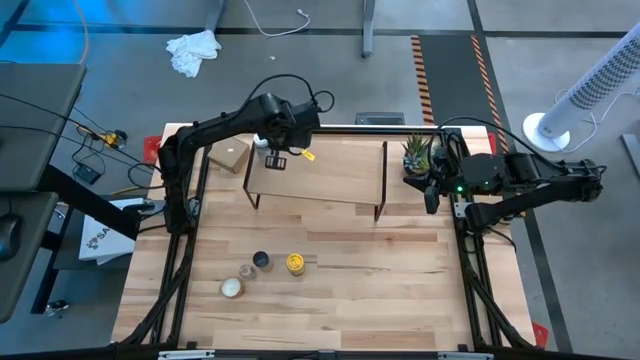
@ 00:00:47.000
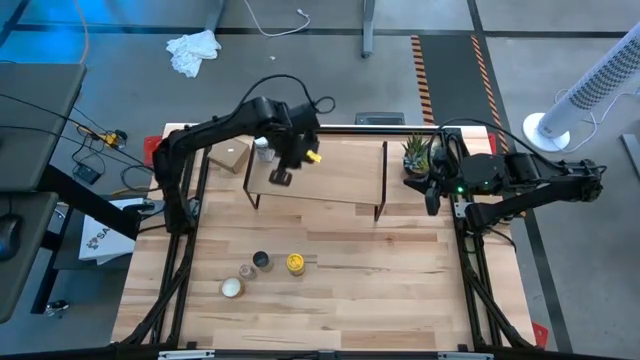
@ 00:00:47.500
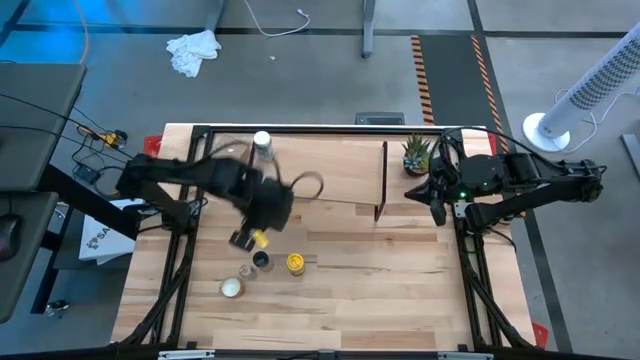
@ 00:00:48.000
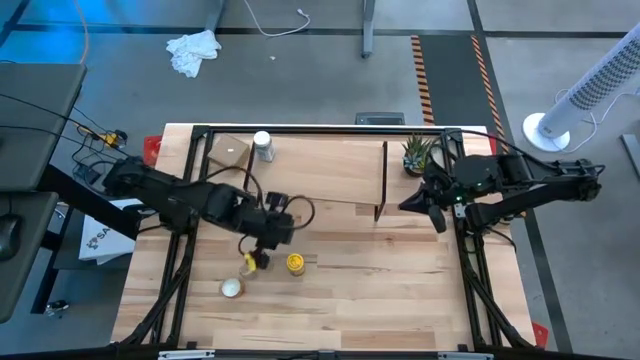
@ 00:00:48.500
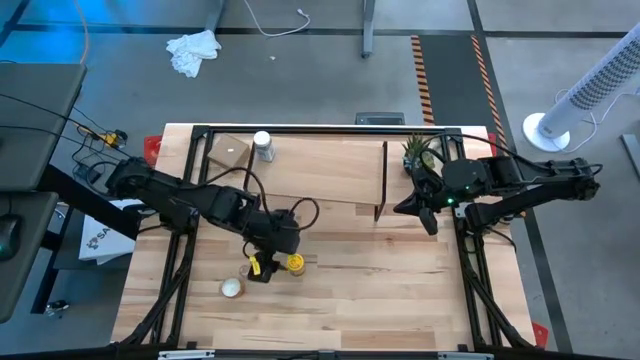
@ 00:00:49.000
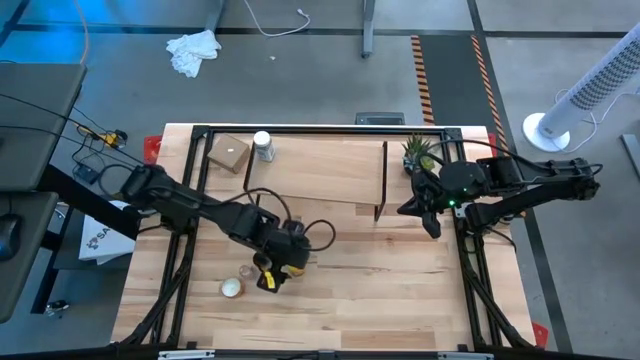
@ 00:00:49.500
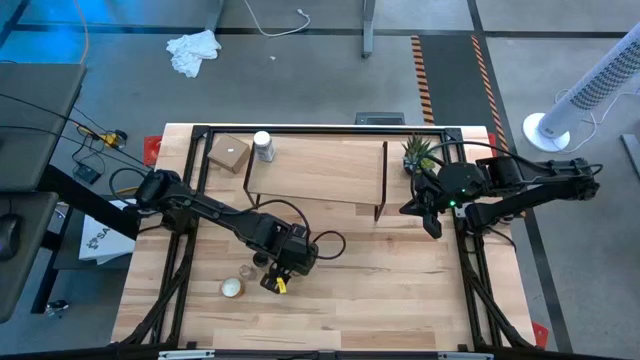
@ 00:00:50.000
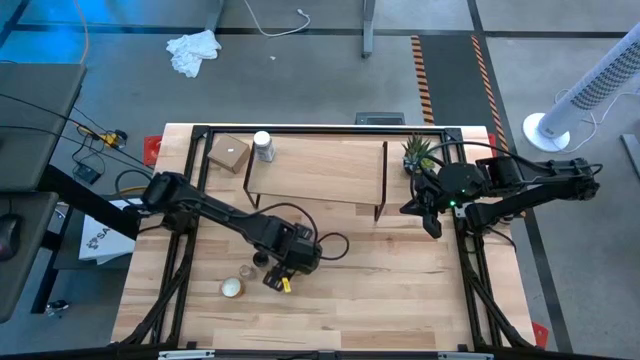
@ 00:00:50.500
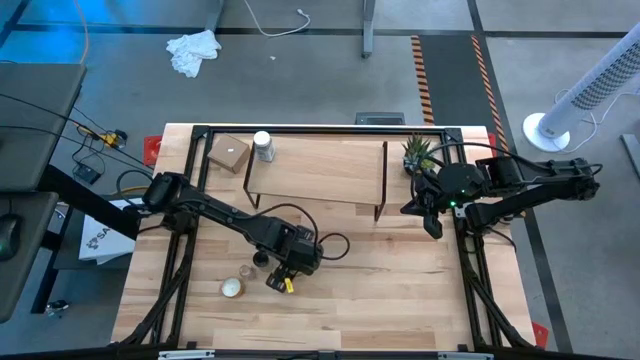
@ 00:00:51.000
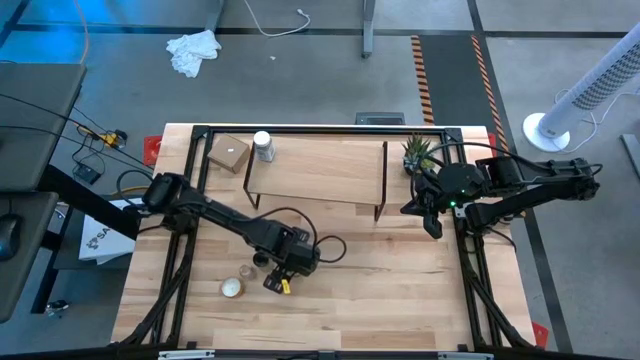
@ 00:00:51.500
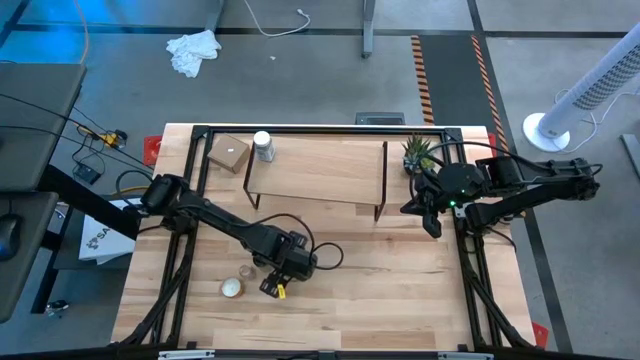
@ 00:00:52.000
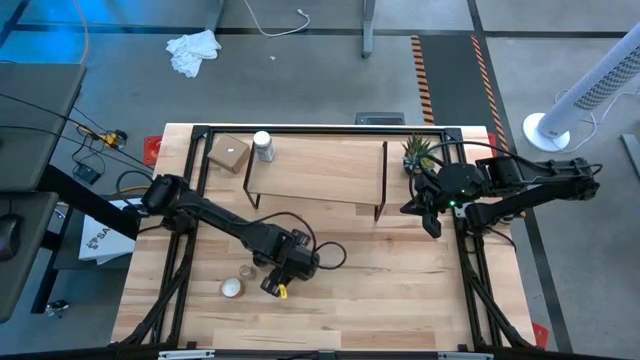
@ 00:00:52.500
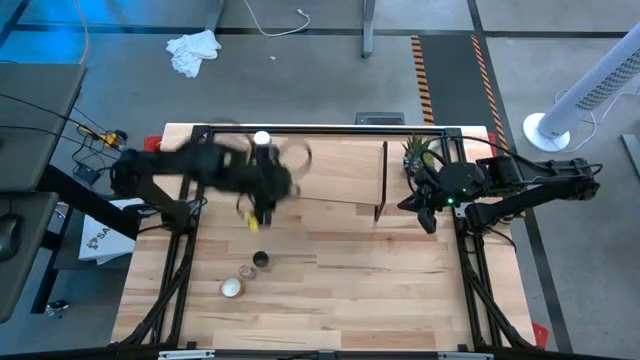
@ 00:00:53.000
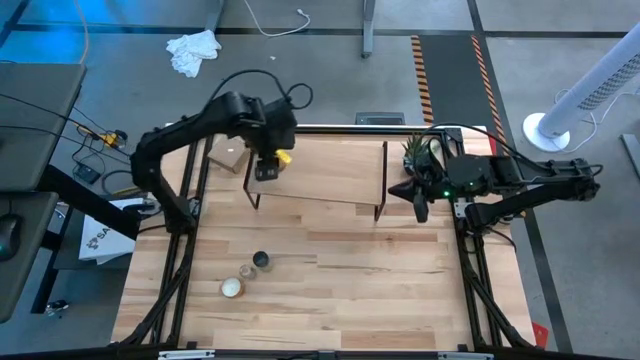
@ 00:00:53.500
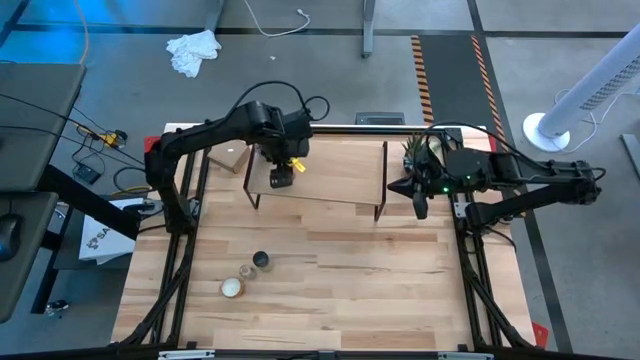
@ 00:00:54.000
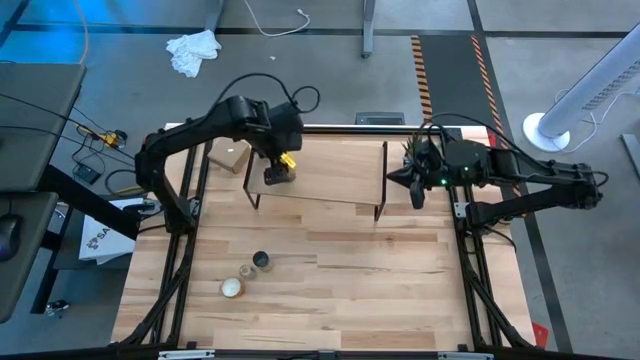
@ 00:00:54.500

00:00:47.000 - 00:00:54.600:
Task: Shelf spices
Put the yellow seasoning bottle on the shelf

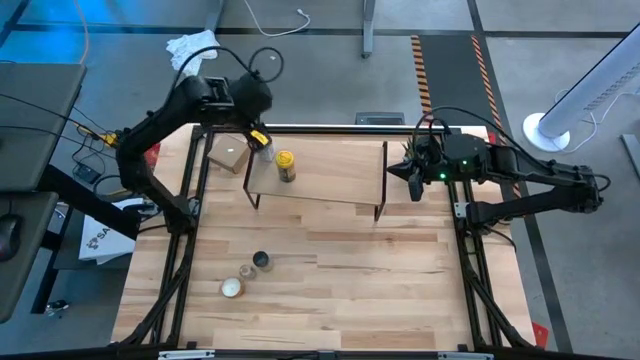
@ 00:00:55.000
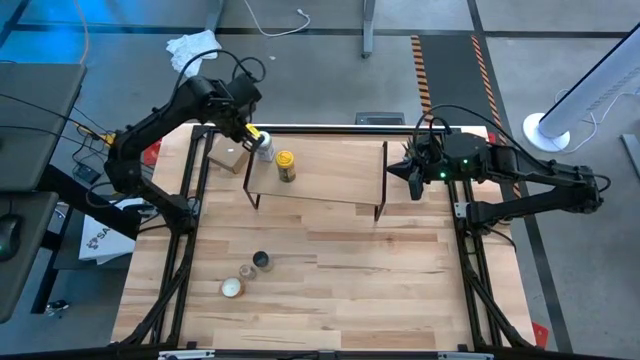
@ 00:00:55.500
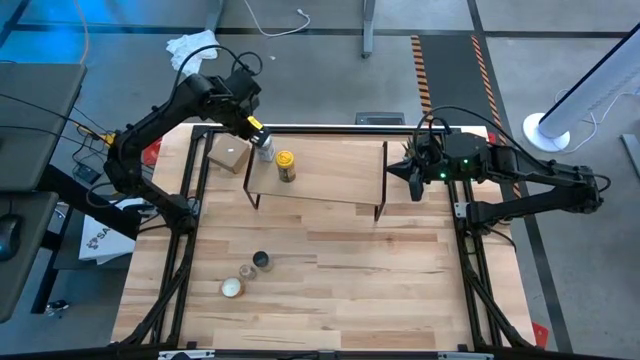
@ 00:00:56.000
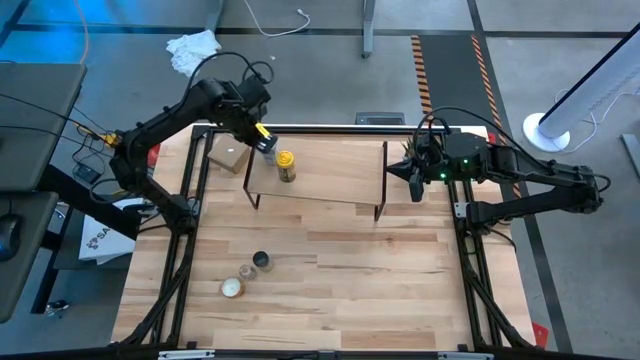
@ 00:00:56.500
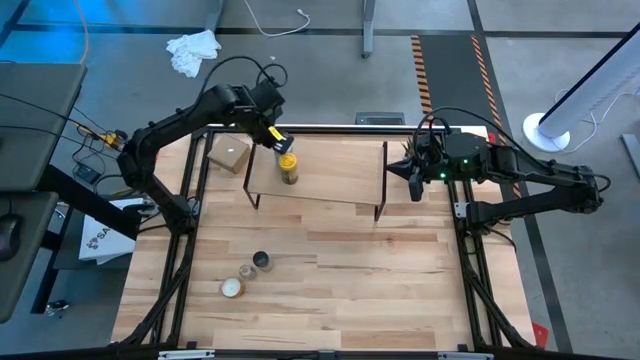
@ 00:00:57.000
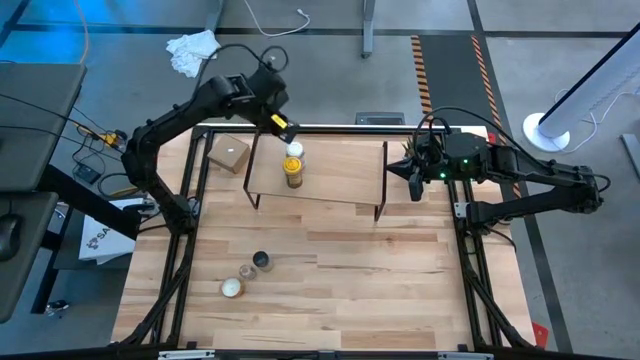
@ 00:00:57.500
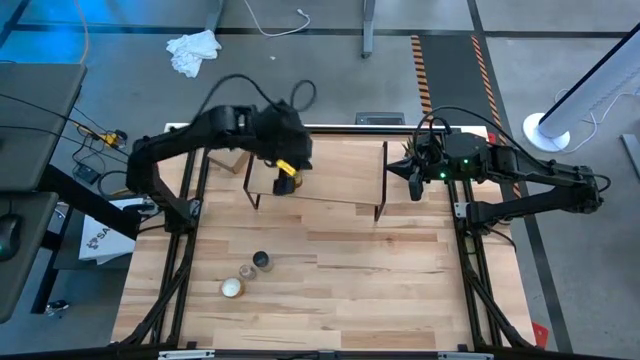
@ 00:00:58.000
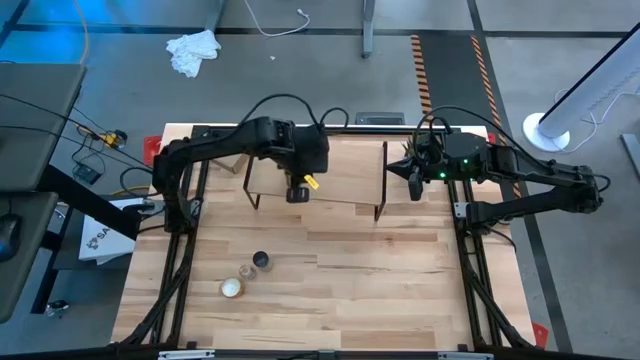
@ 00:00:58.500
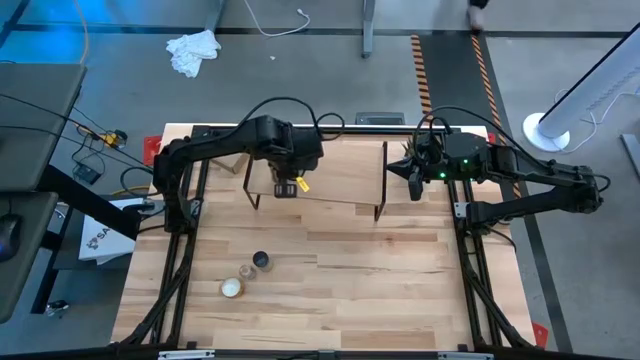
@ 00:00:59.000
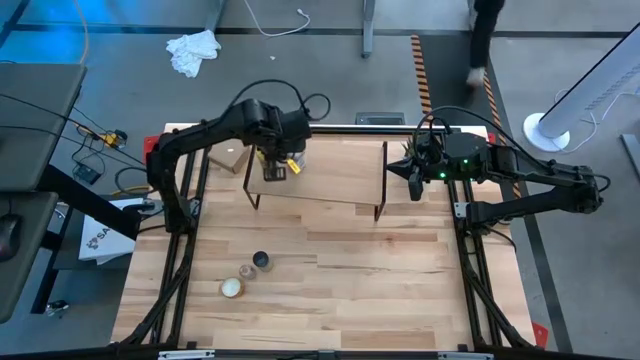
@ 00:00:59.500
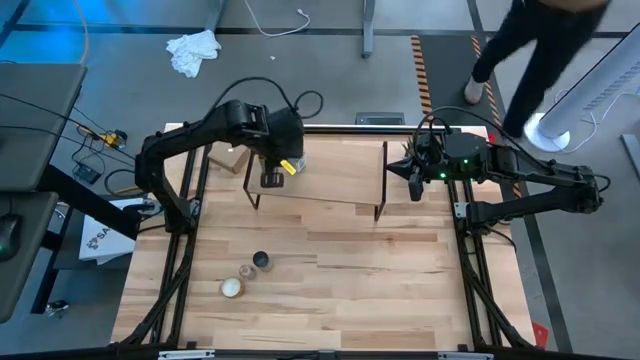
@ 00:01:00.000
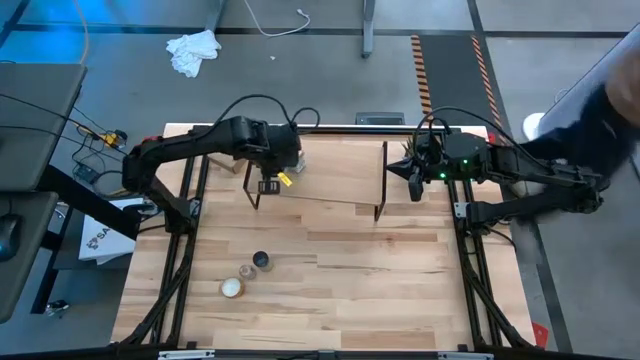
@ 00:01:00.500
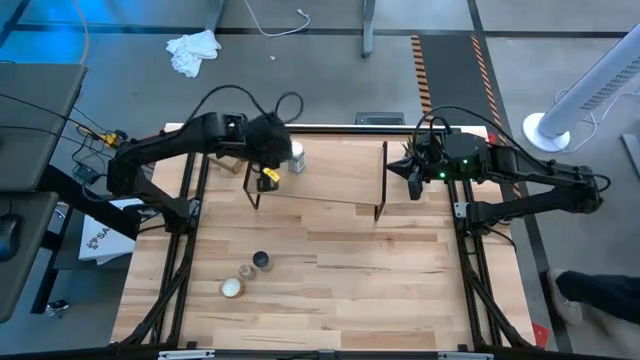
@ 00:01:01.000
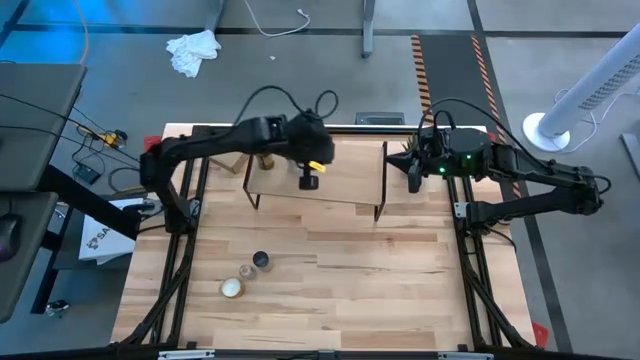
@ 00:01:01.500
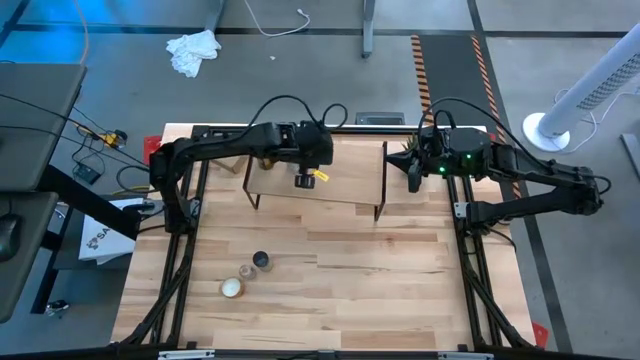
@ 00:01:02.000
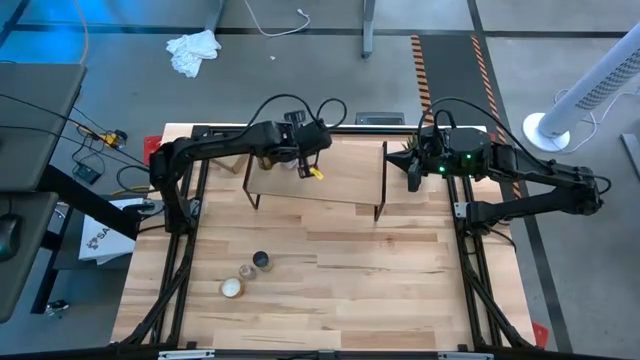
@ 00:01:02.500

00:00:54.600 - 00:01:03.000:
Adjust the seasoning bottles on the shelf

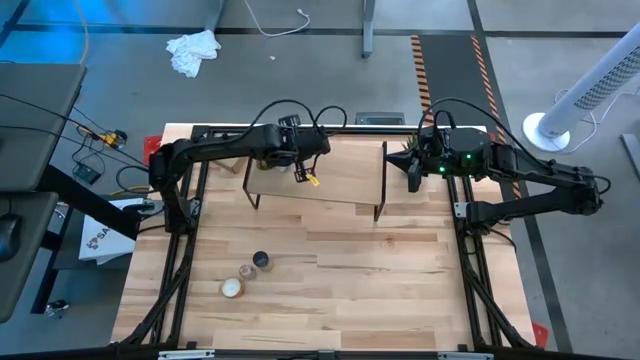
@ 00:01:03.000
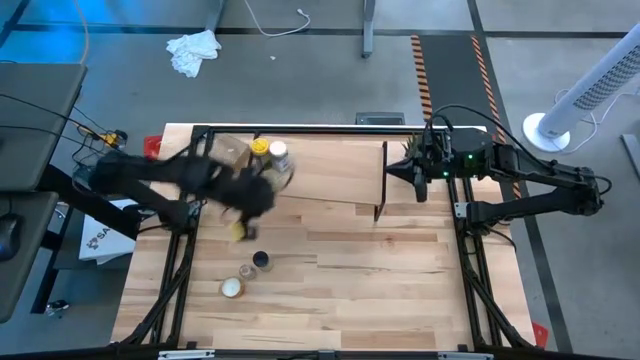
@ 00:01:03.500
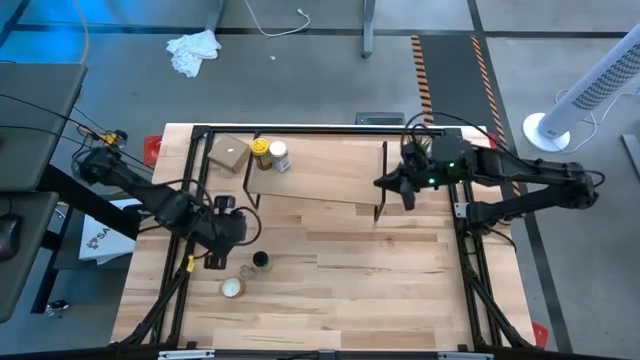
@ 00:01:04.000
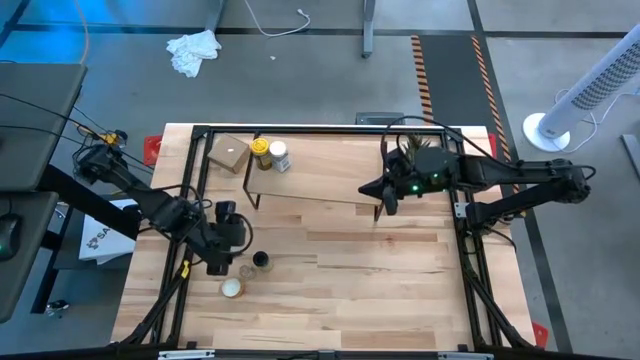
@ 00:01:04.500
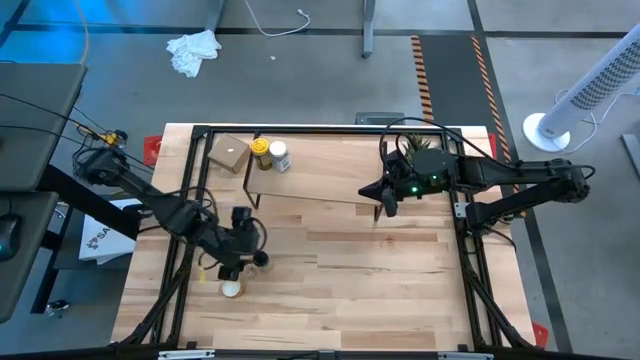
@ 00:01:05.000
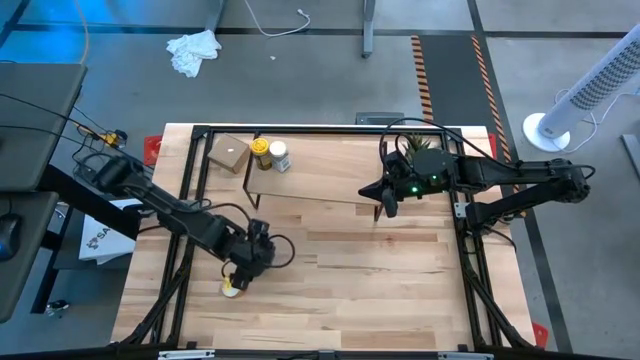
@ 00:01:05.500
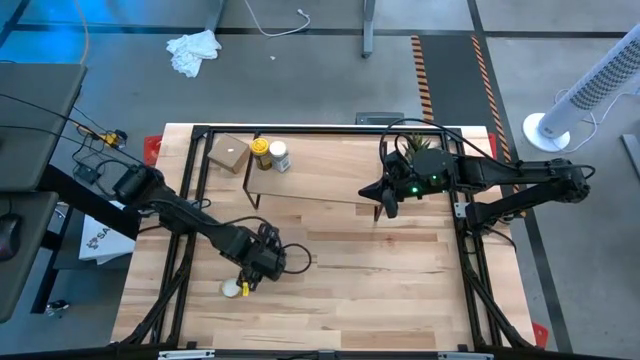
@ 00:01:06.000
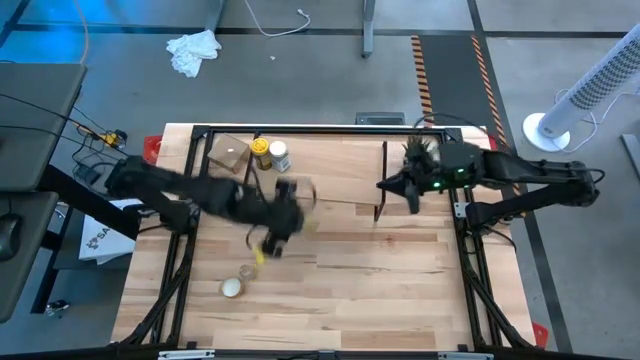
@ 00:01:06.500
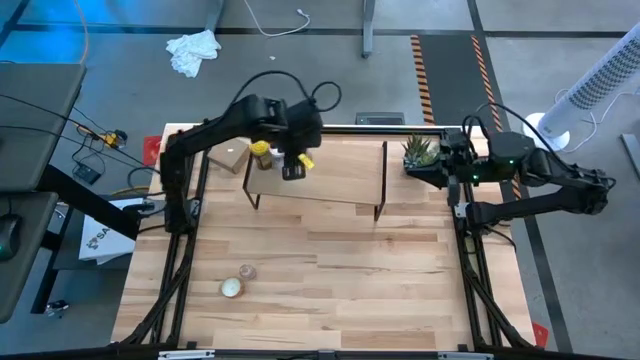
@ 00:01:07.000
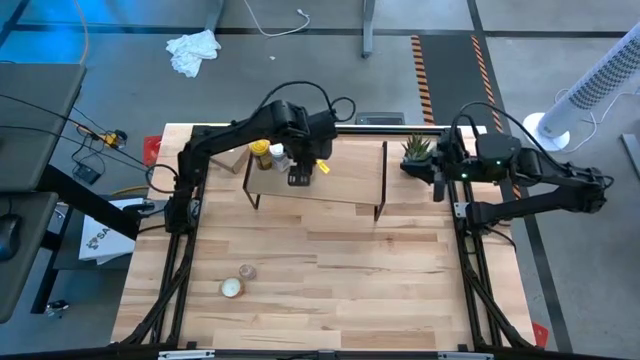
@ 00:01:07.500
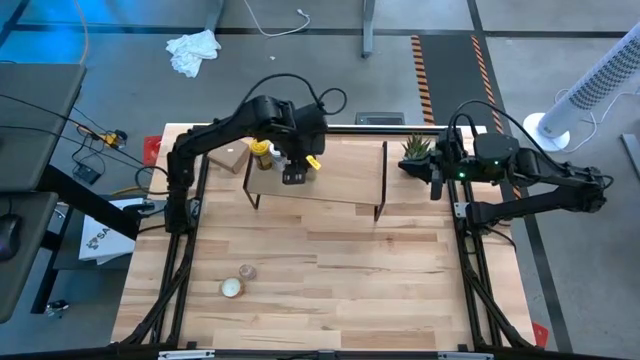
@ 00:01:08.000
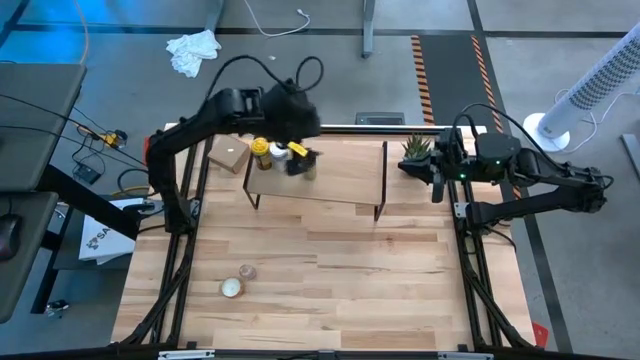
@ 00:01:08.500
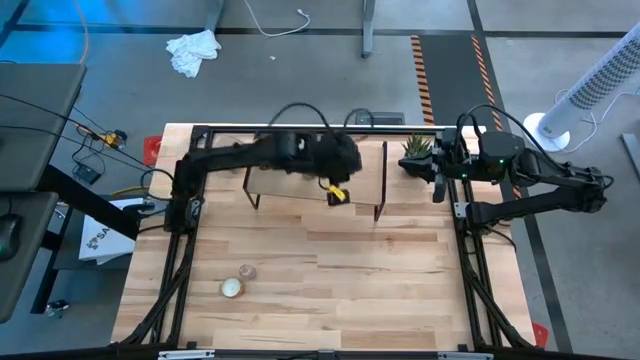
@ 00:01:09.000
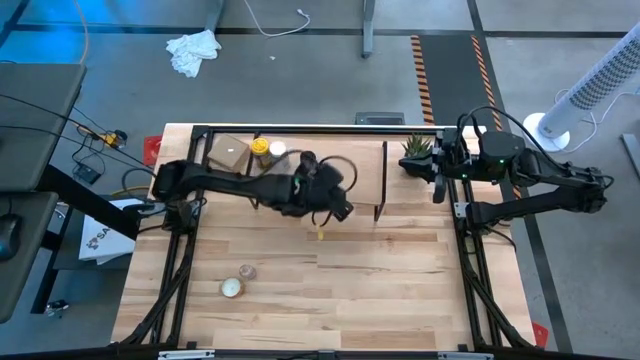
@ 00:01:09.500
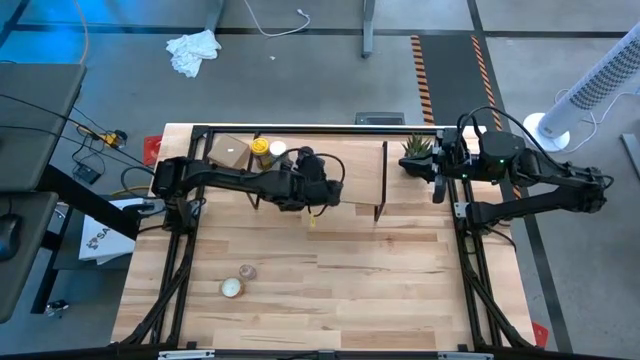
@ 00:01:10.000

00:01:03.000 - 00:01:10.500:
Put the black seasoning bottle on the shelf
